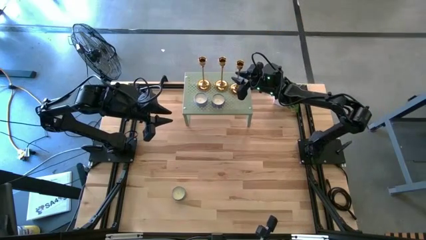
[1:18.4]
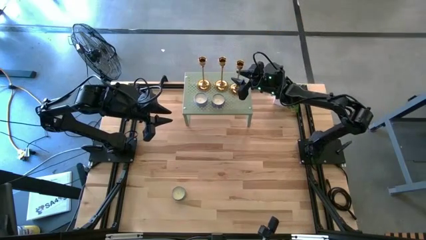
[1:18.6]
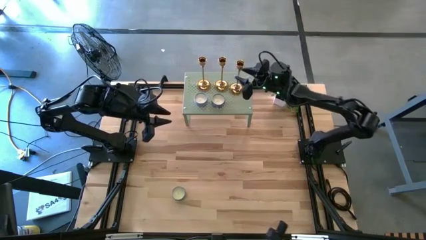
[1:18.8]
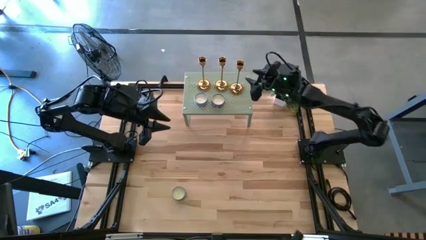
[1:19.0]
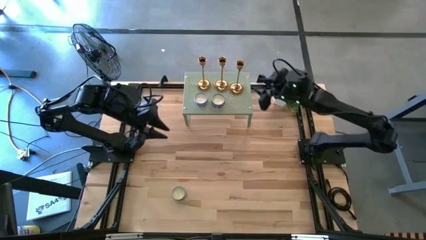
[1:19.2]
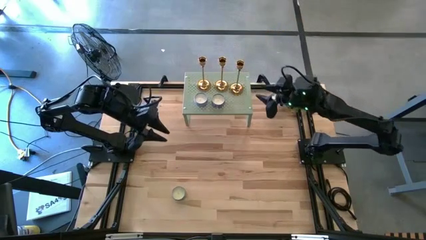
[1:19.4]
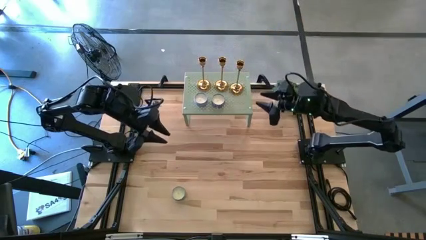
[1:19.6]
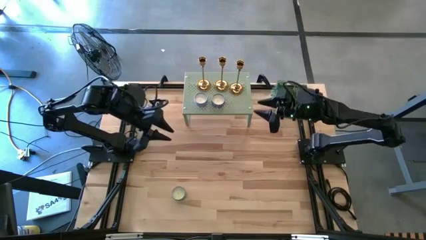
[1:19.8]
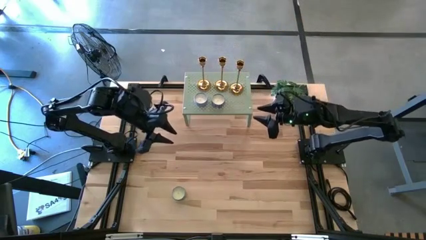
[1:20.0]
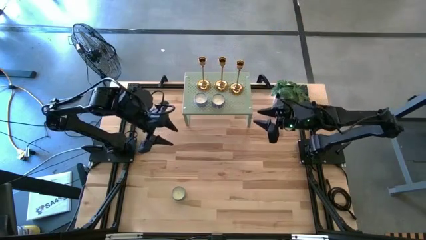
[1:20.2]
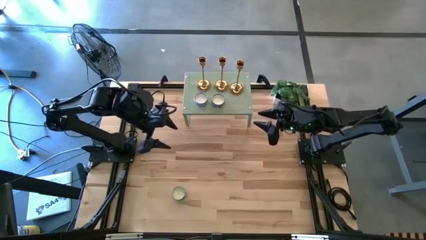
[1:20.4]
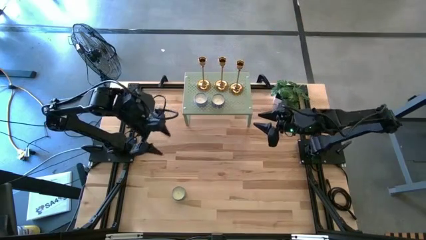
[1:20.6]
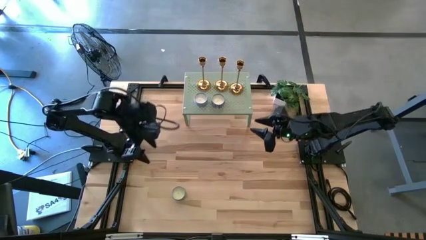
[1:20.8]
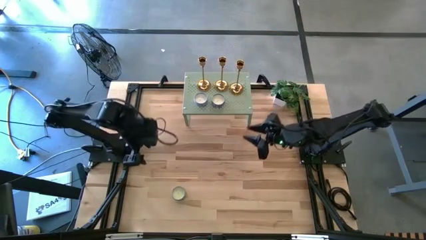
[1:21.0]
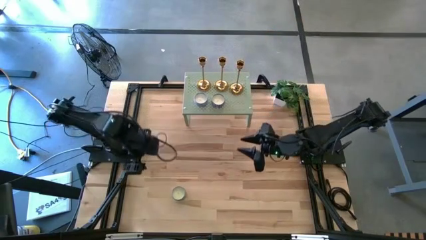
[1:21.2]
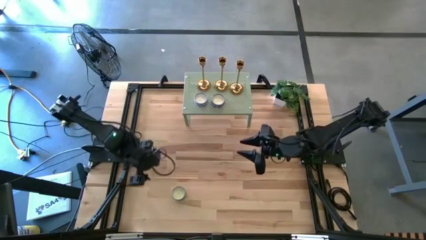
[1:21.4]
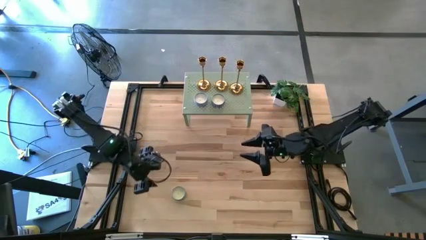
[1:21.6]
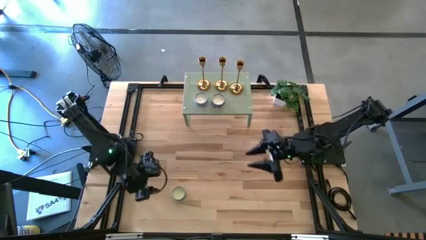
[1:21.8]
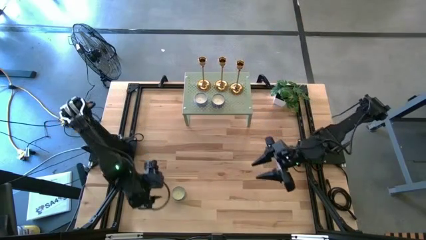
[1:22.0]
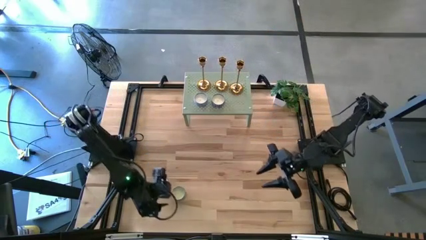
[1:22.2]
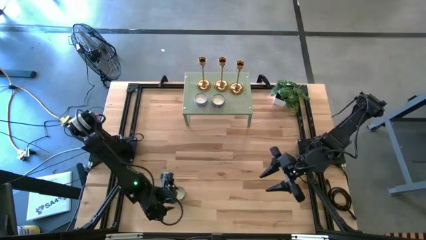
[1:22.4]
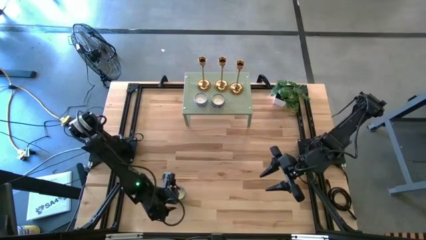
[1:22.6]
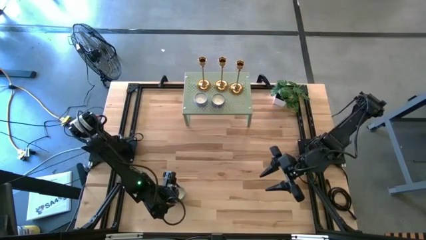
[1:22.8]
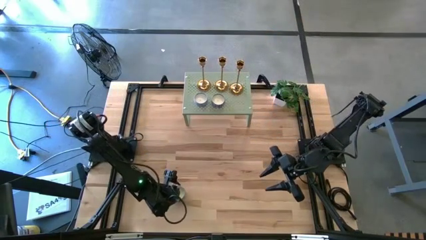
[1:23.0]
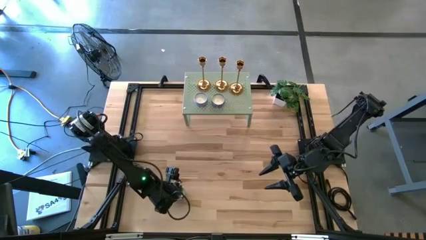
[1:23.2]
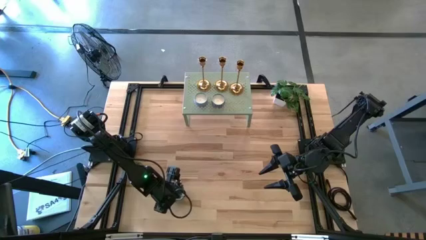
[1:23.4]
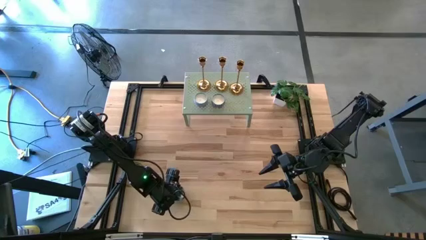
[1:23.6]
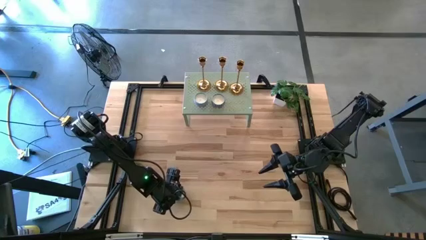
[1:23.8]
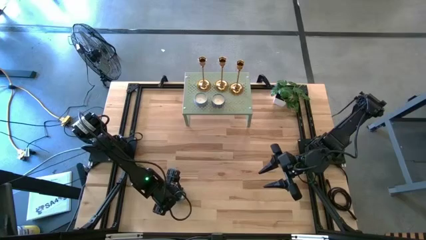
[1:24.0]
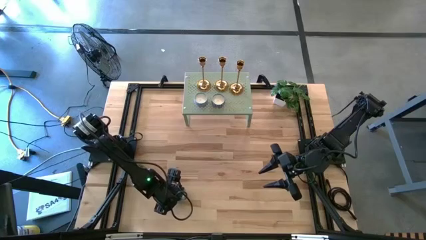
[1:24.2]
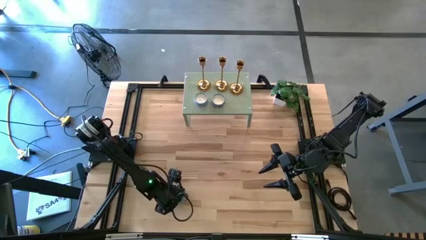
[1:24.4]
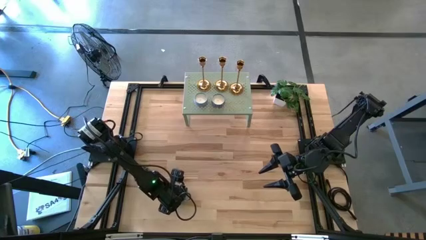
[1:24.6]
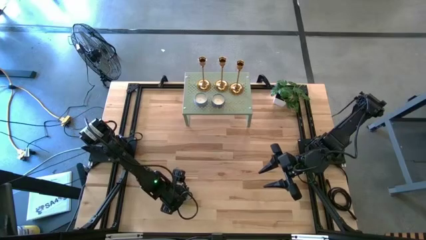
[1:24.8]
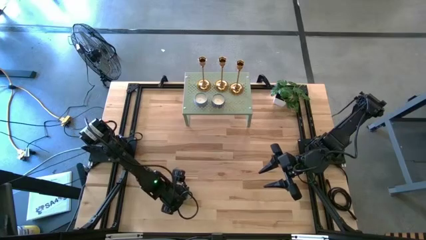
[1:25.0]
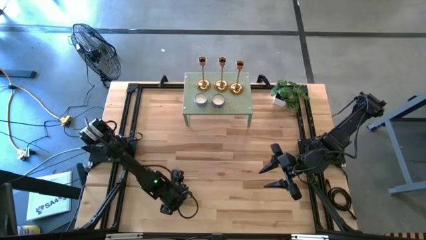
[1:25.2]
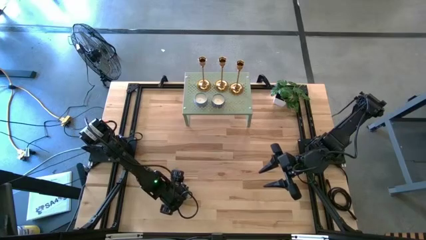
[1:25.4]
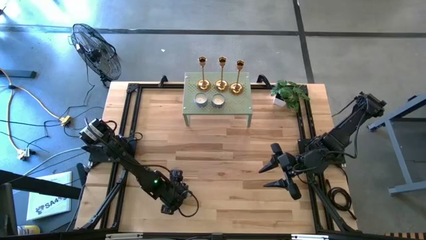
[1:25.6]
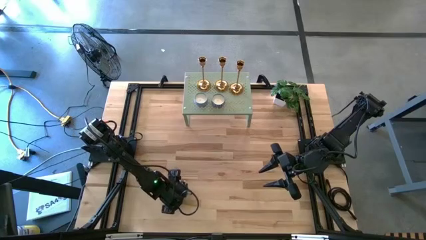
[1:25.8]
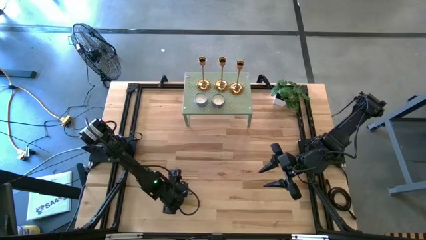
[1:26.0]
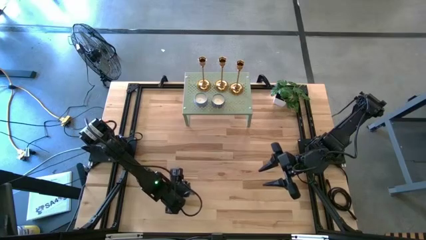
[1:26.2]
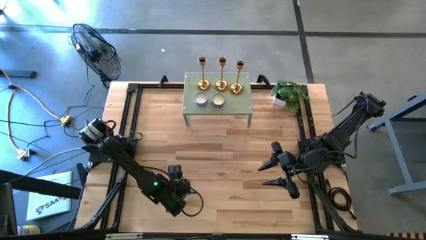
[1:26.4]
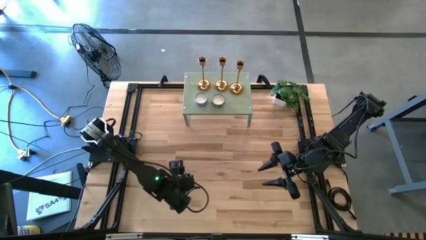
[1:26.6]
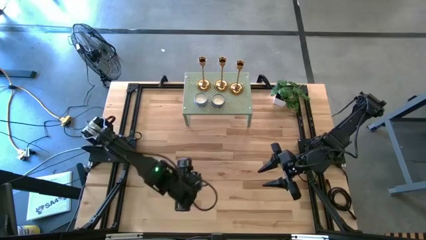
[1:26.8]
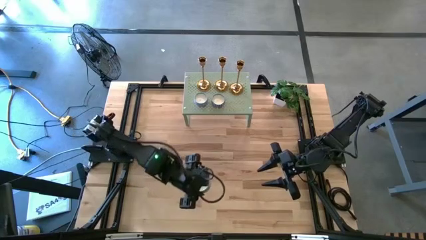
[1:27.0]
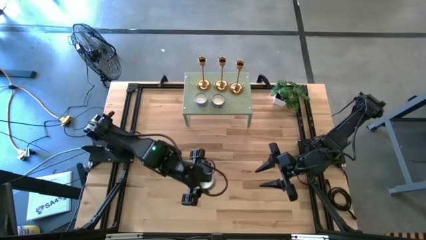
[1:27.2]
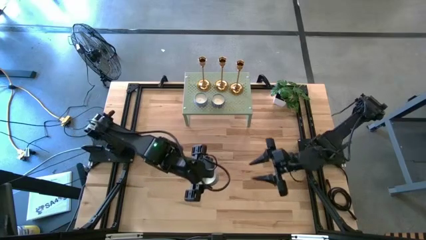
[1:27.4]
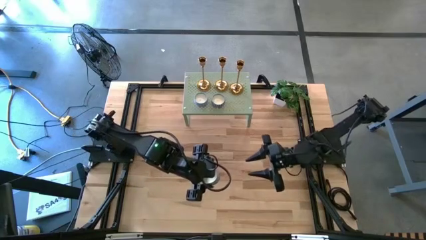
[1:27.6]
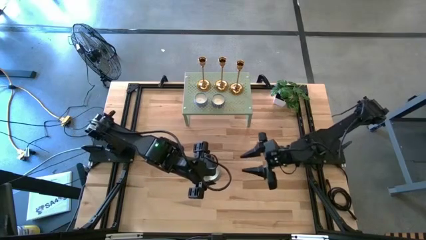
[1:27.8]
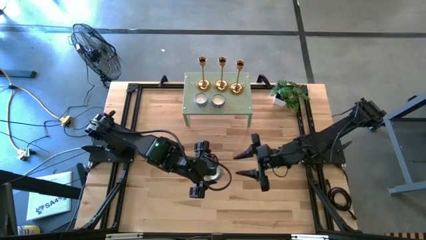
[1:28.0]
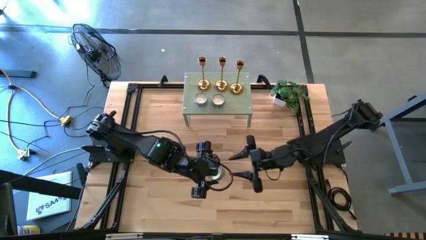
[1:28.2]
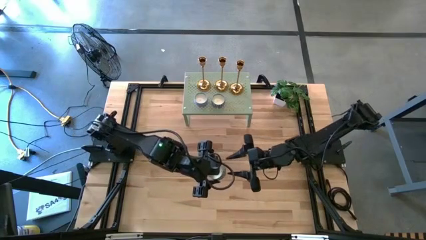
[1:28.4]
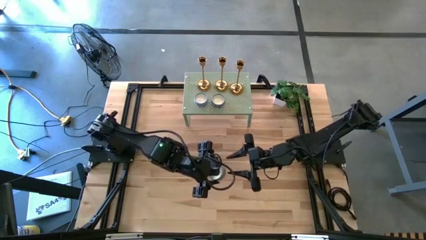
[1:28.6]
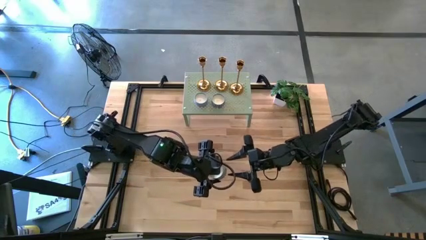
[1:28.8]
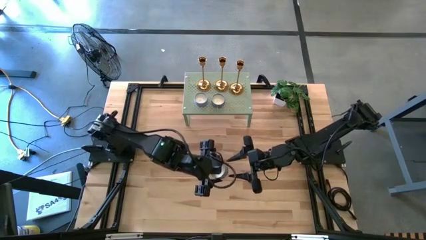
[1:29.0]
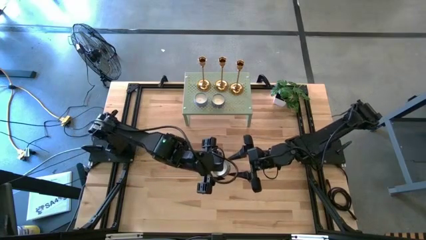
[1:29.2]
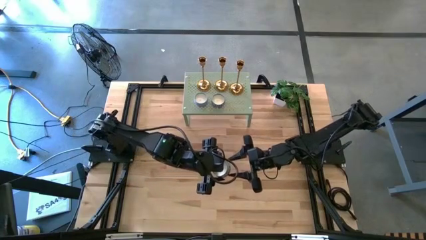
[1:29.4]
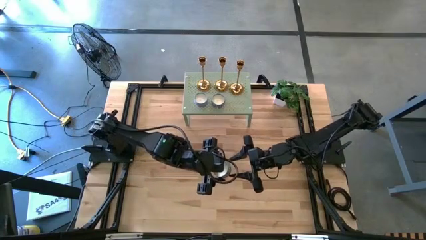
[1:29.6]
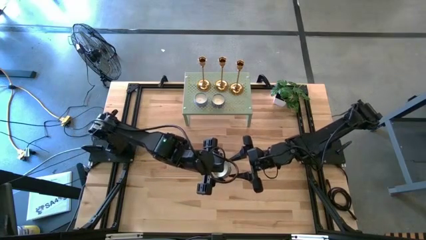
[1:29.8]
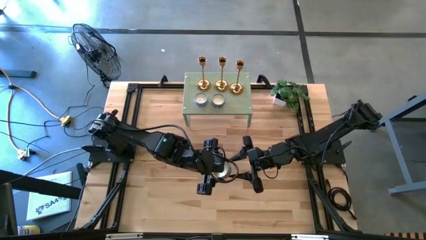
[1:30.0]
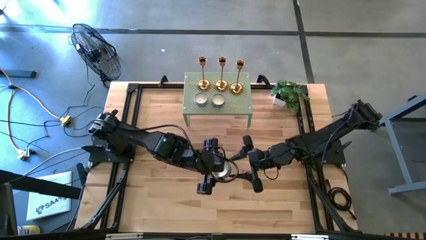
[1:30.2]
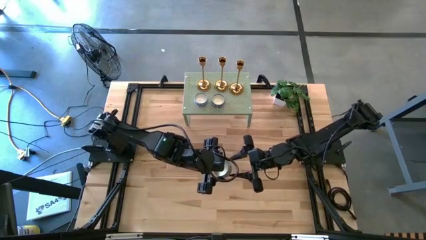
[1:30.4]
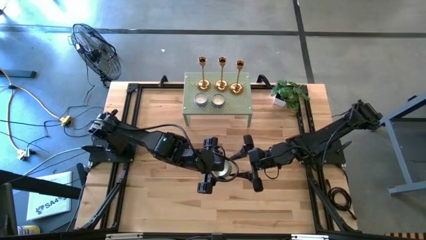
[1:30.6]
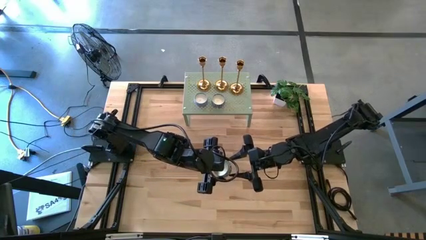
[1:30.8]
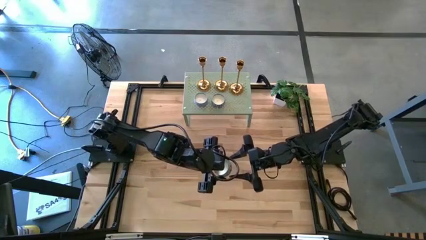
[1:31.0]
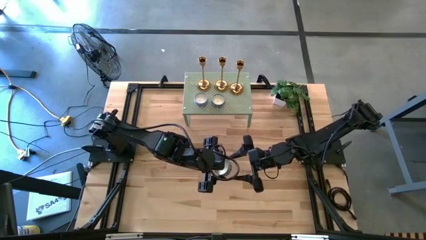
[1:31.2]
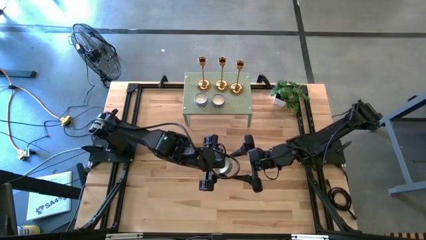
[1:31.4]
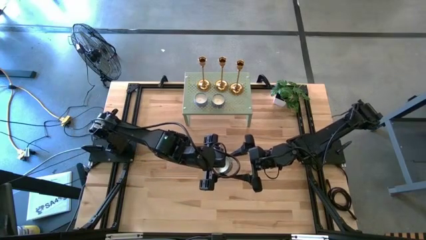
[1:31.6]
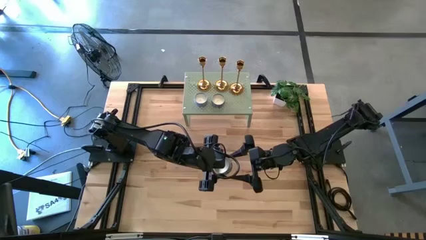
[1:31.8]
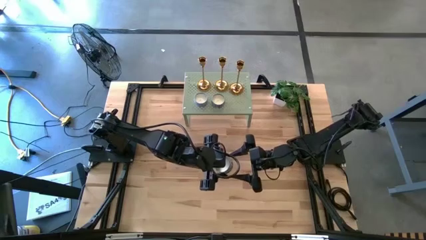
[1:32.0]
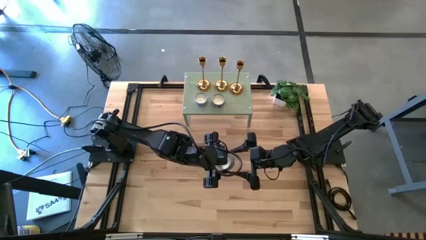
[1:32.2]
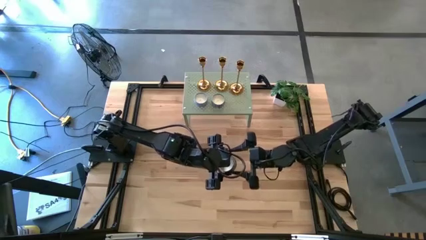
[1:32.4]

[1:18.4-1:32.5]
Task: Pick & Place candle stick holders
Put the blue scented candle on the shelf
